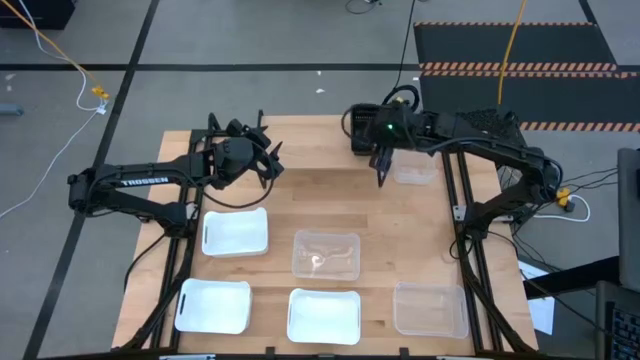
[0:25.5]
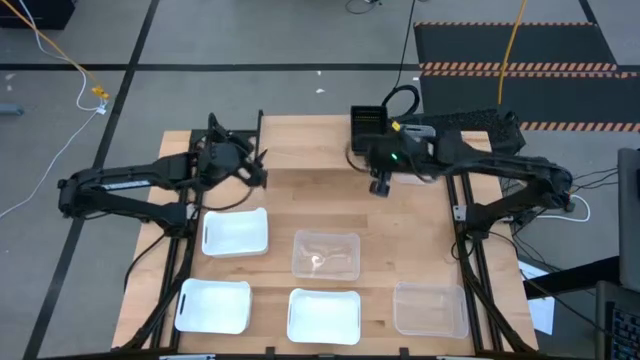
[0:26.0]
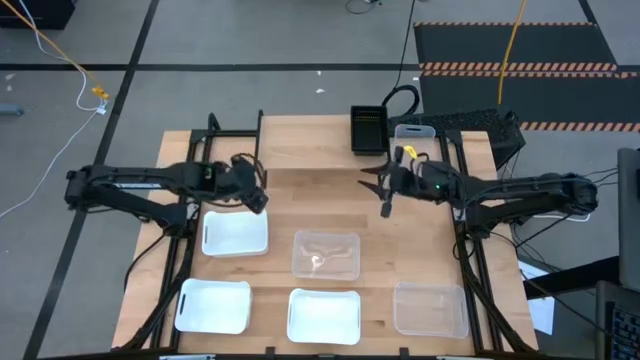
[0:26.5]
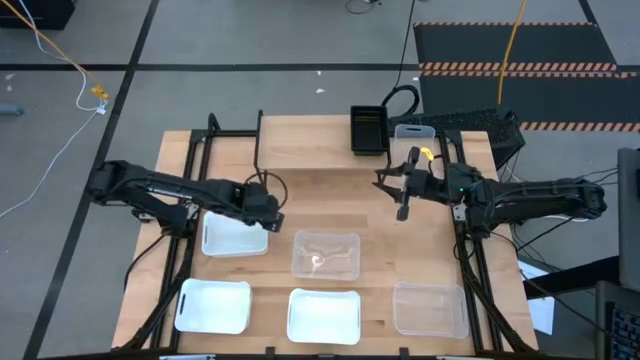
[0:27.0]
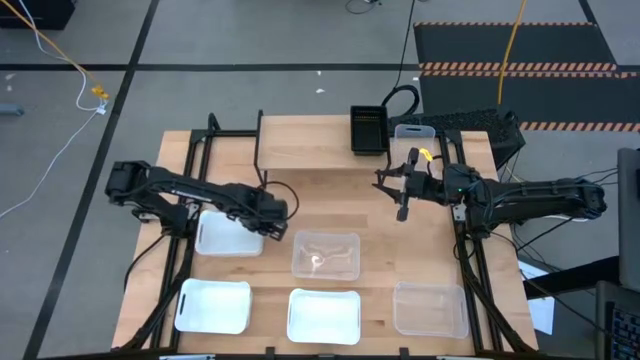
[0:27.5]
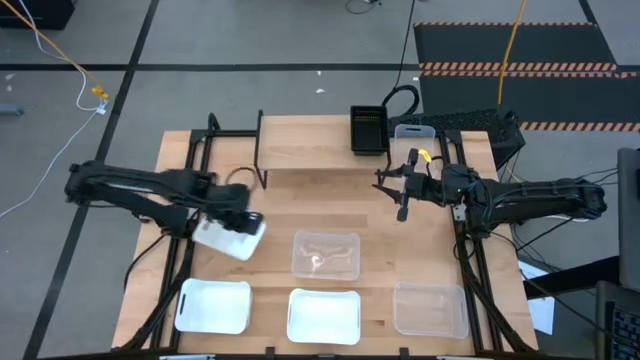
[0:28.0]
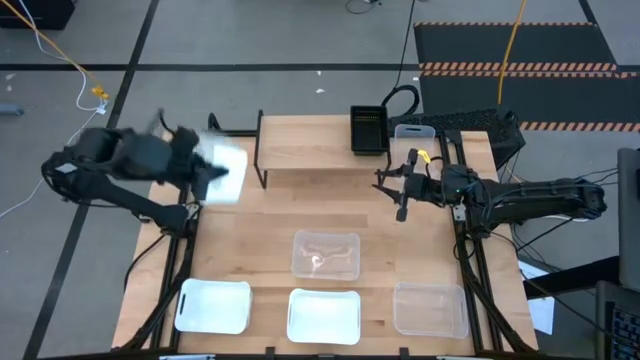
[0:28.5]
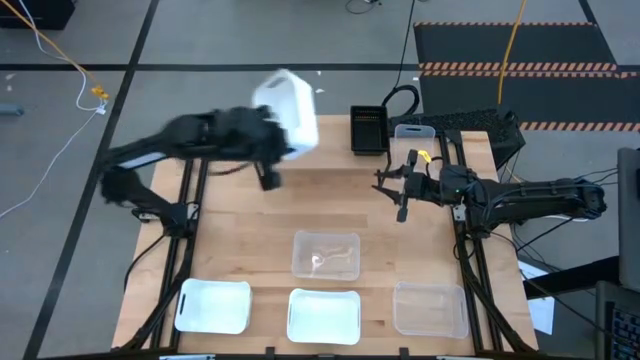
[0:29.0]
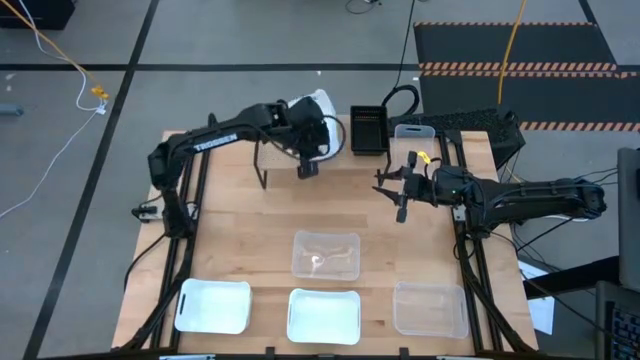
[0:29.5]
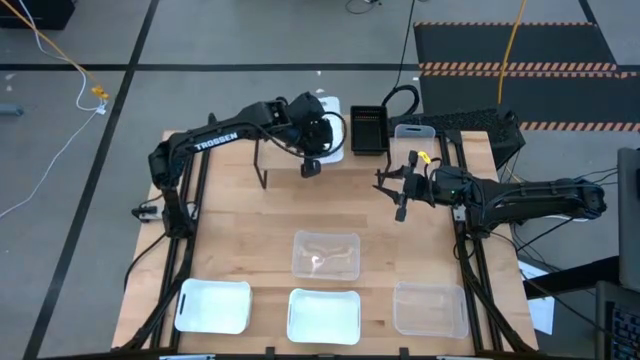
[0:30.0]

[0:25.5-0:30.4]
Task: Stack baskets on shelf by color
Put the top white bin on the shelf

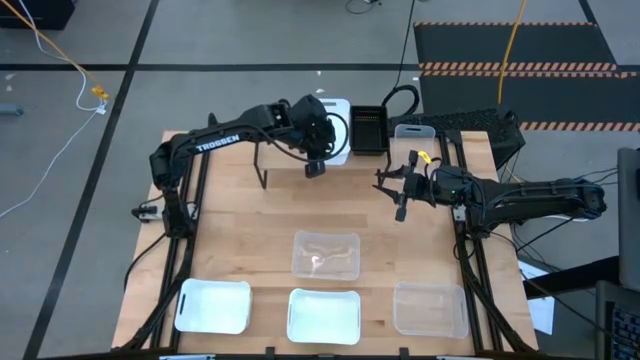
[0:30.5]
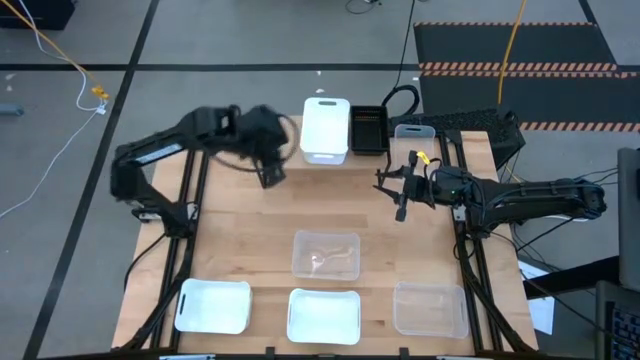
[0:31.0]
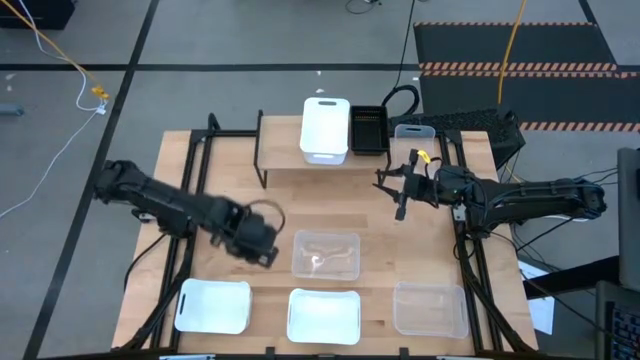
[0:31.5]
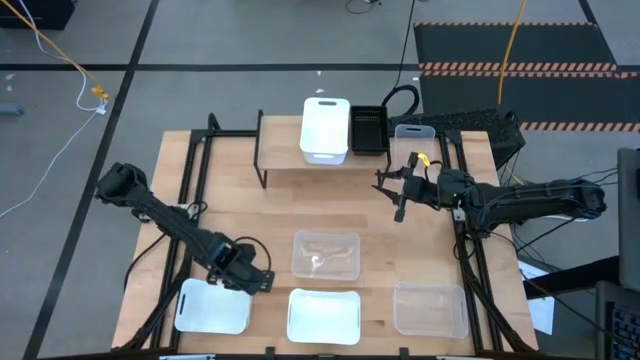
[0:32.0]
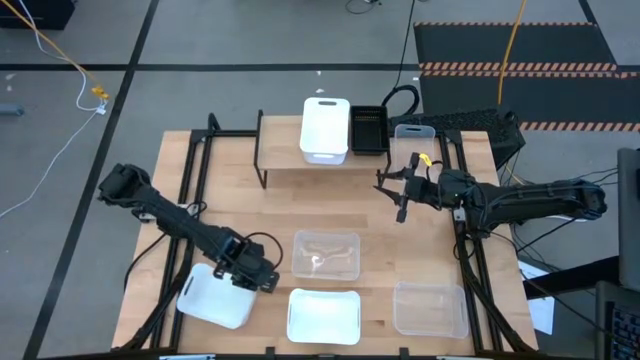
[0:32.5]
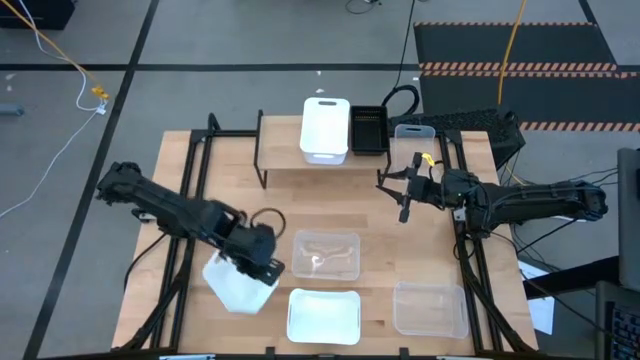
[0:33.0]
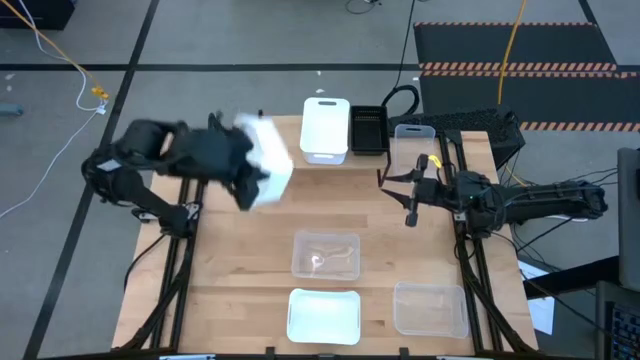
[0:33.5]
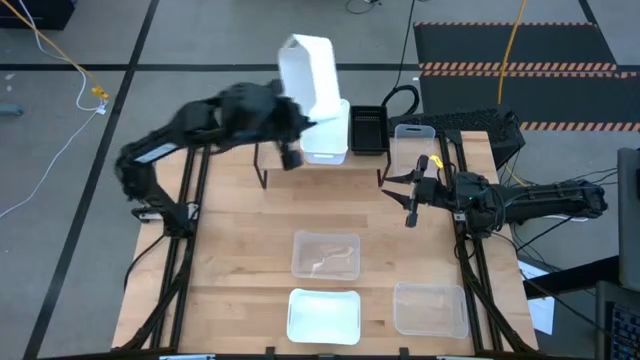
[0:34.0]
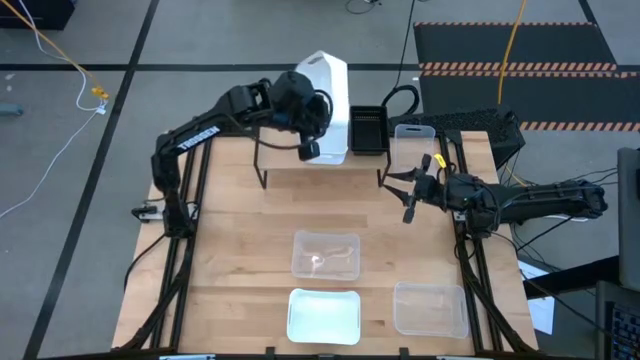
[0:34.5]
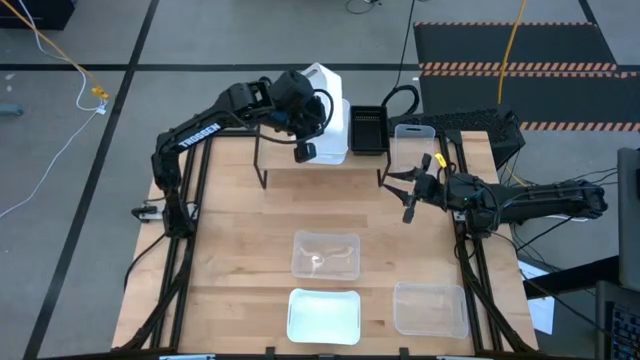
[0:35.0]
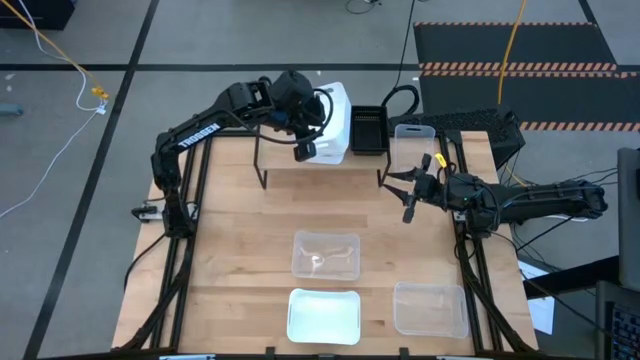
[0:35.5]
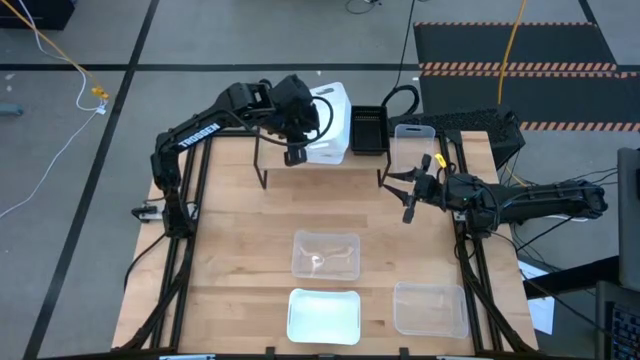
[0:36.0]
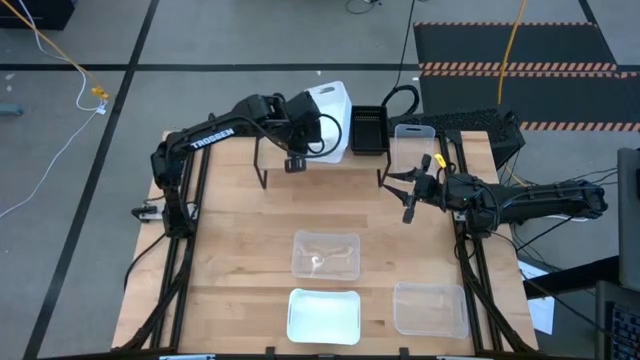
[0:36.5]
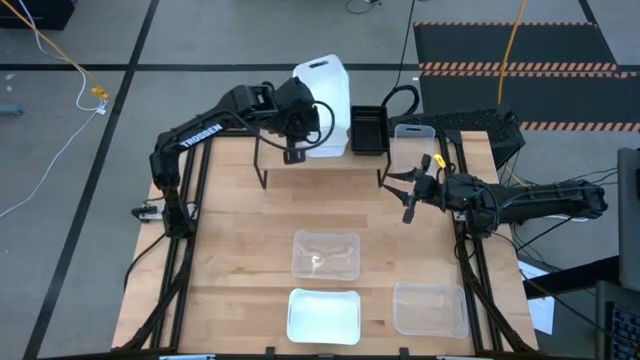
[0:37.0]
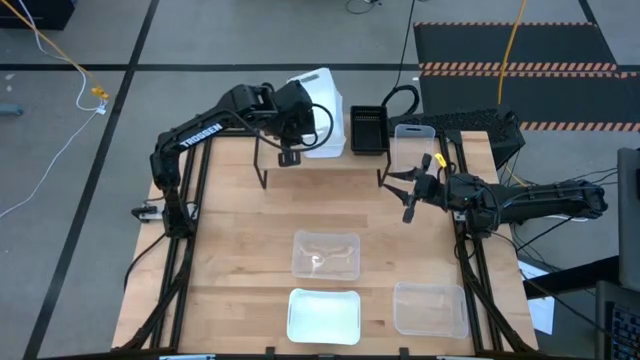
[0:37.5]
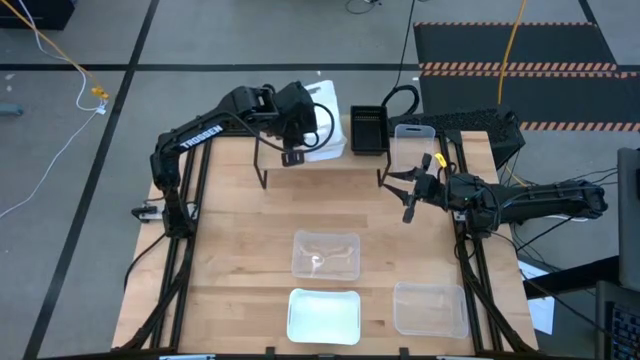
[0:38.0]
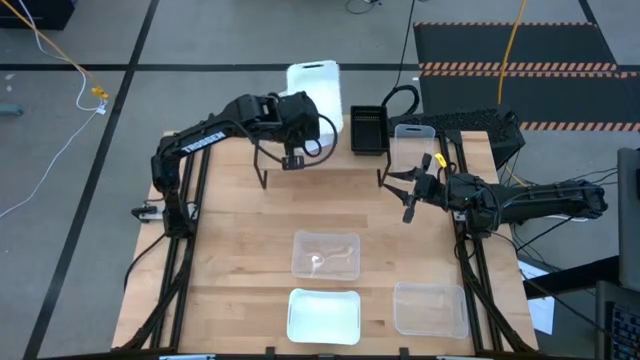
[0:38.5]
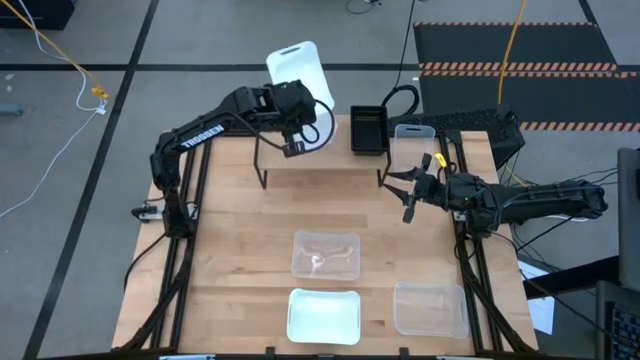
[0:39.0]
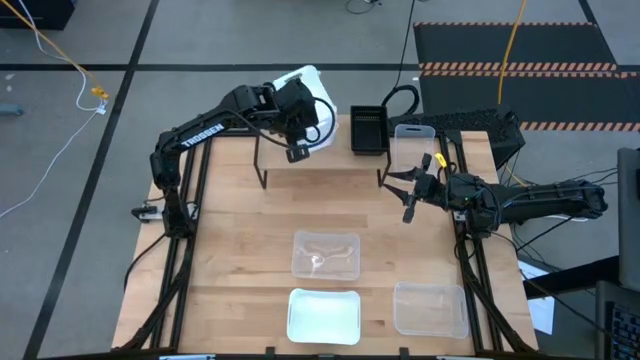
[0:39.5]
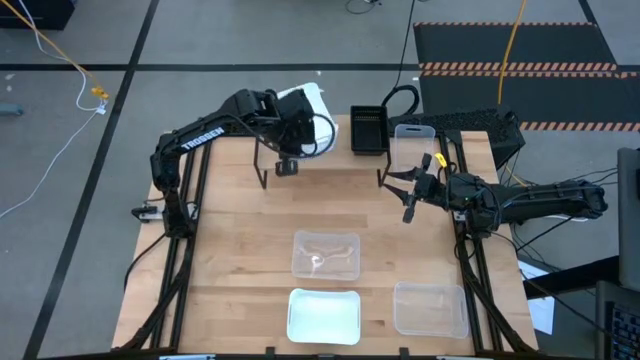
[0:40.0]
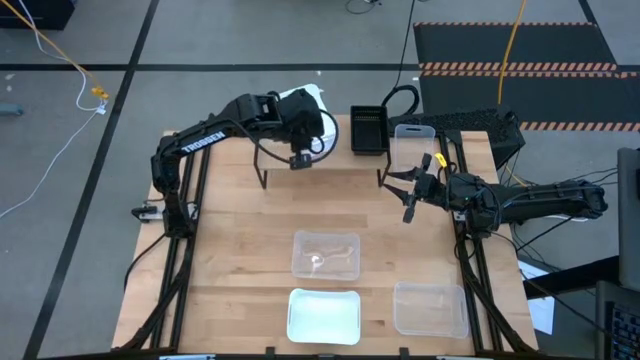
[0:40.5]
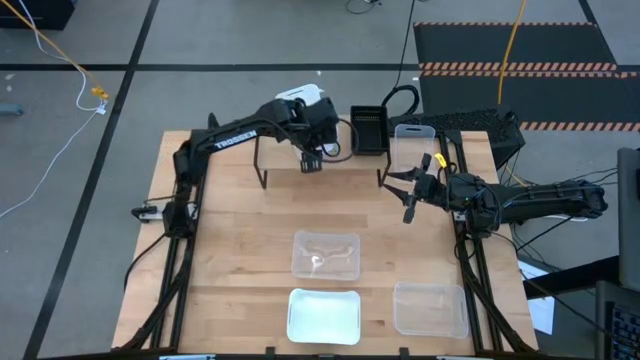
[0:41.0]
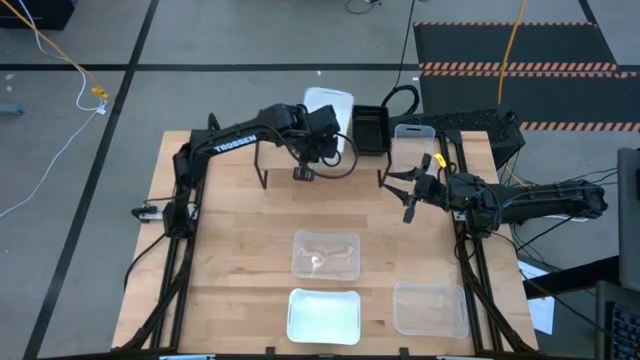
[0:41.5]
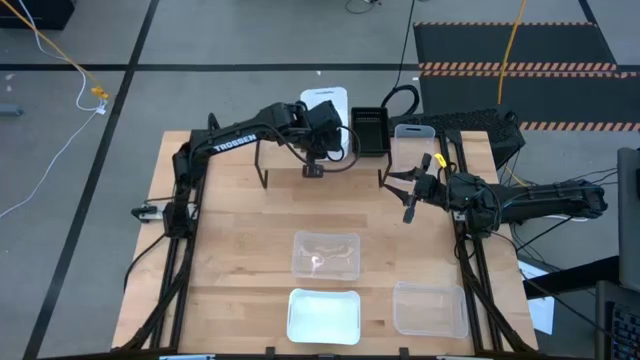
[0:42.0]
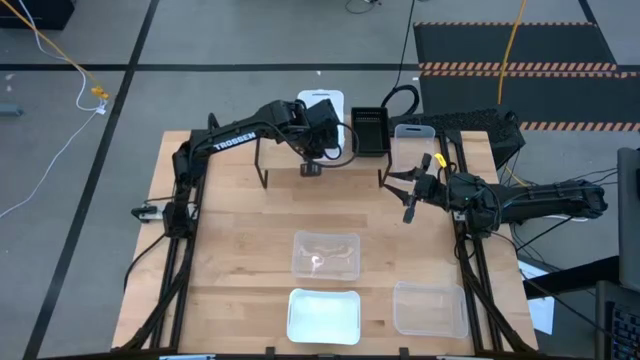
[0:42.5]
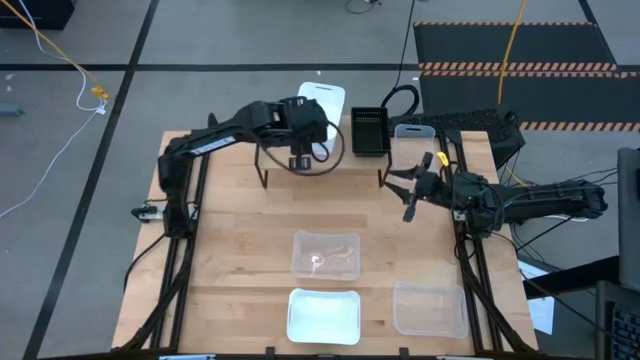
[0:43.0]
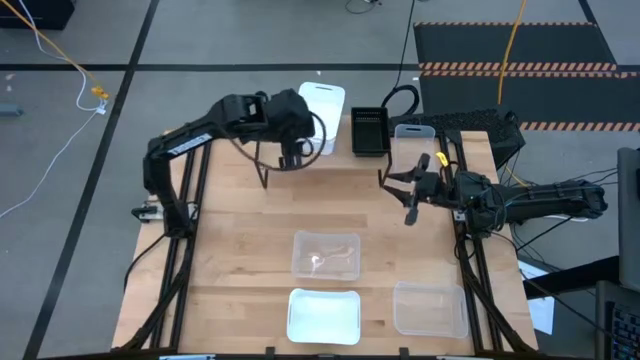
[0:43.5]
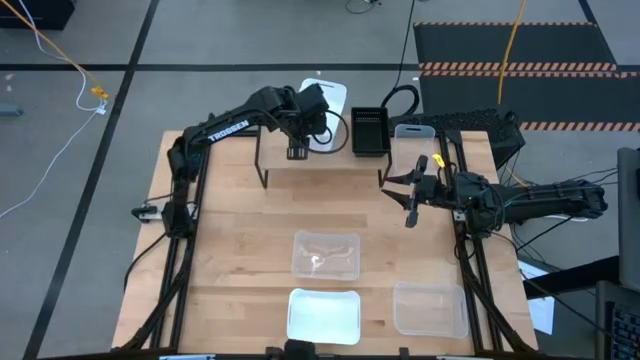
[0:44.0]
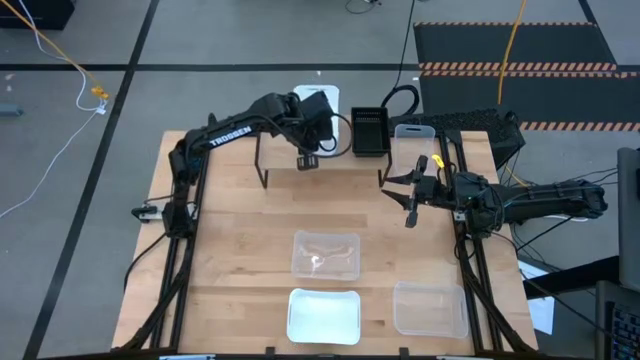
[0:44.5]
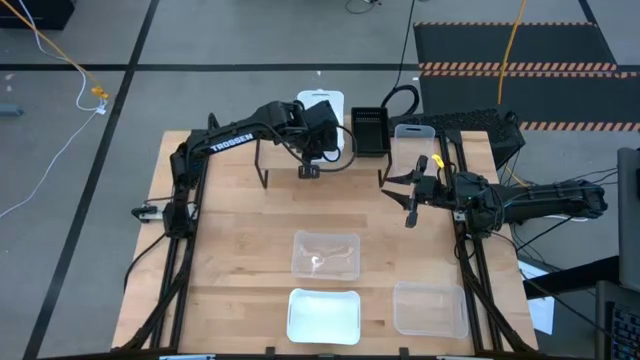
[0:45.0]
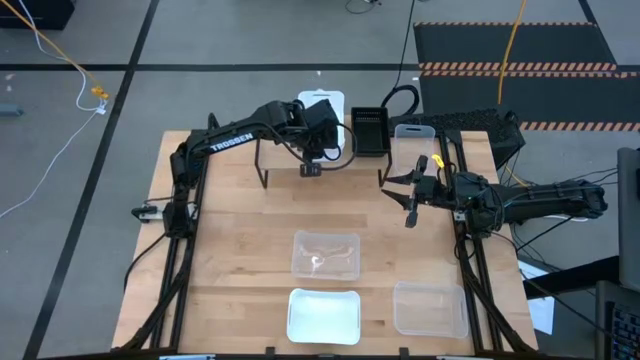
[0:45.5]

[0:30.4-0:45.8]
Stack the left white bin on the white bin on the shelf

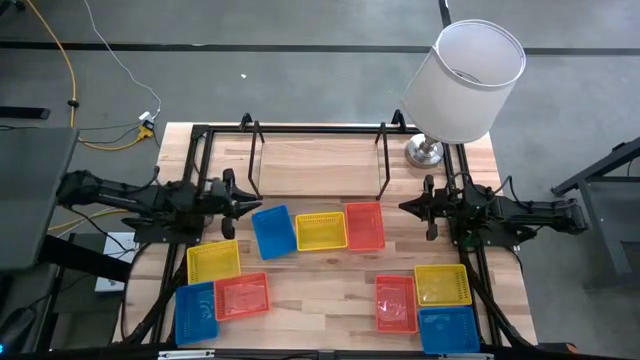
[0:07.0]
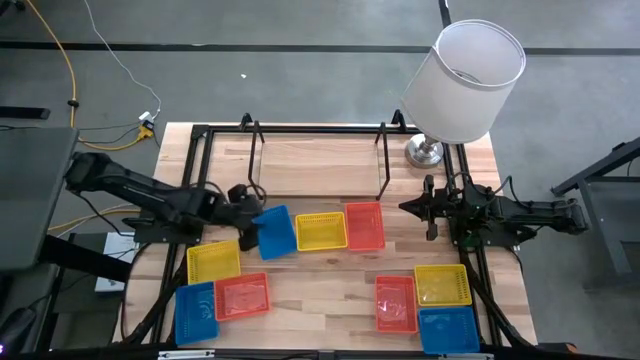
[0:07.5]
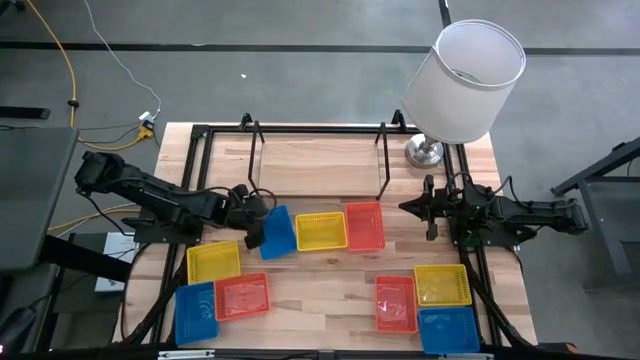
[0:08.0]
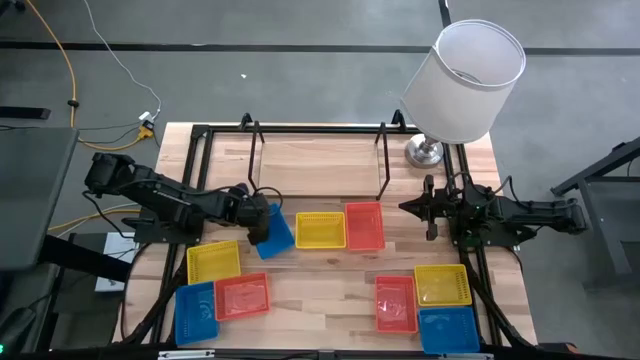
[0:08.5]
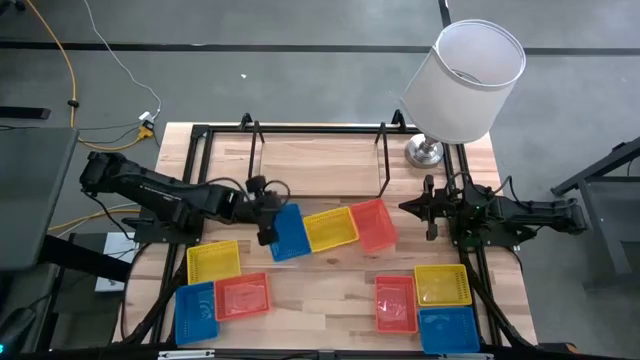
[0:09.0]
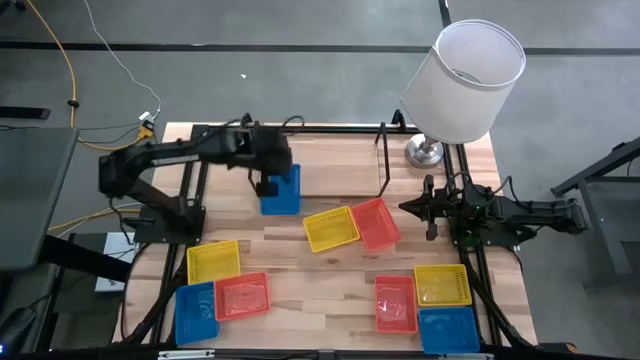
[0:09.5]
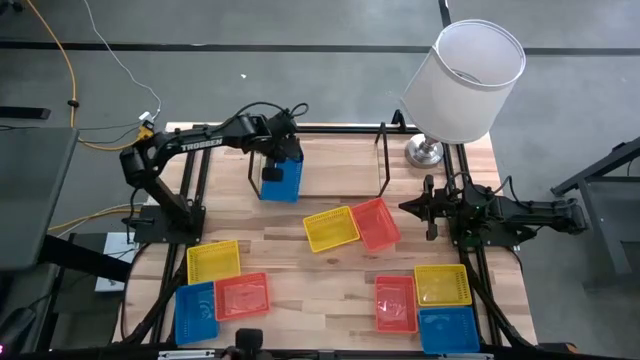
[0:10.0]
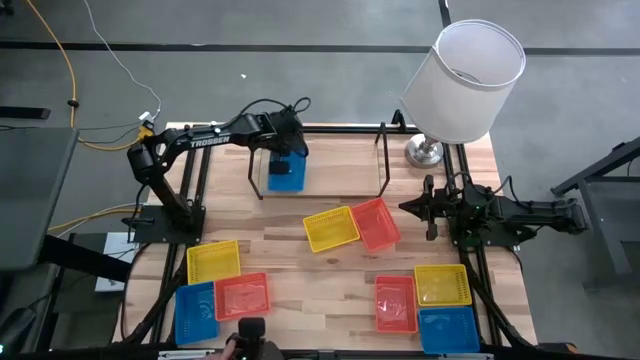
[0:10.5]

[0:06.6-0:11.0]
Task: Stack baskets on shelf by color
Put the top blue bin on the shelf
